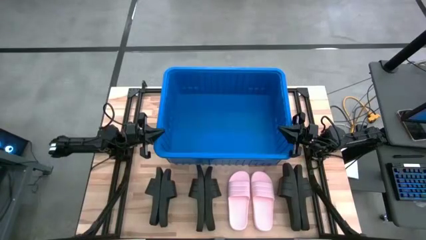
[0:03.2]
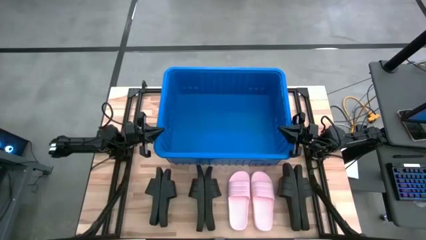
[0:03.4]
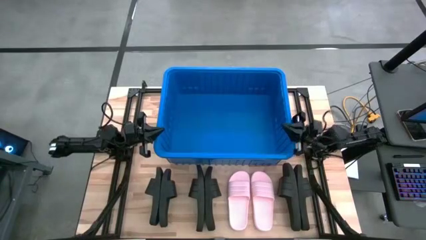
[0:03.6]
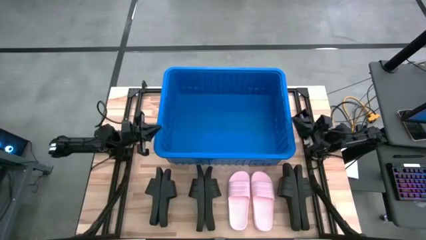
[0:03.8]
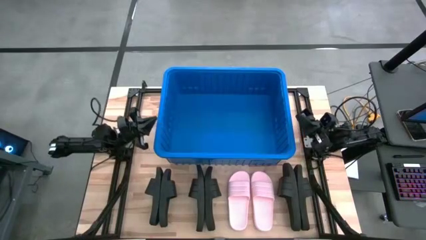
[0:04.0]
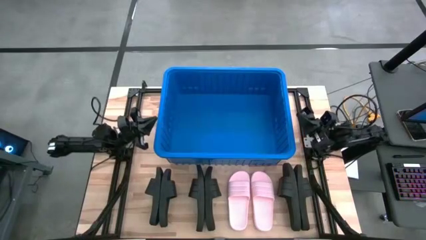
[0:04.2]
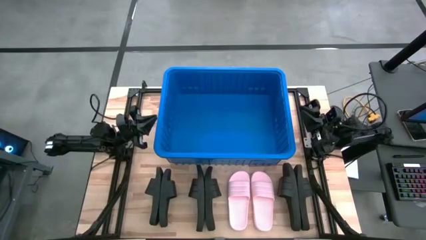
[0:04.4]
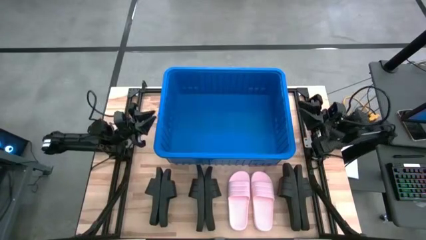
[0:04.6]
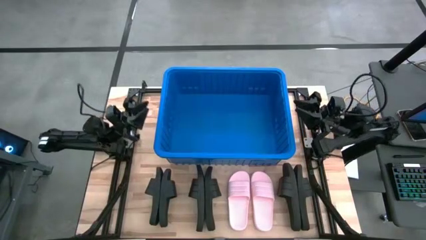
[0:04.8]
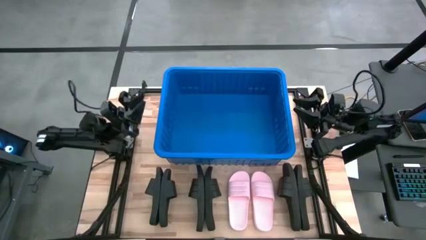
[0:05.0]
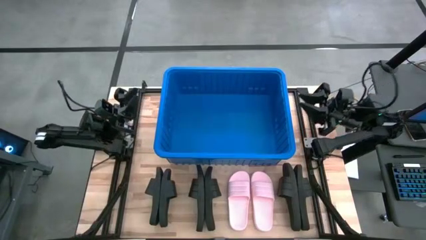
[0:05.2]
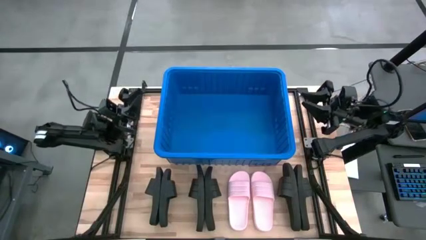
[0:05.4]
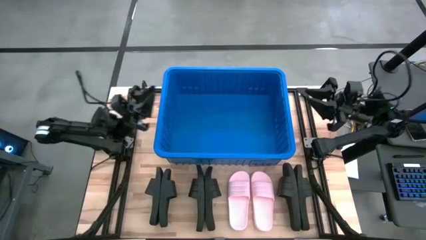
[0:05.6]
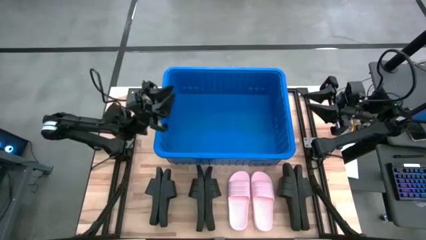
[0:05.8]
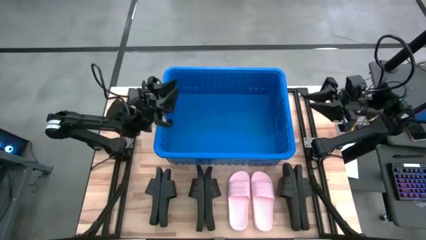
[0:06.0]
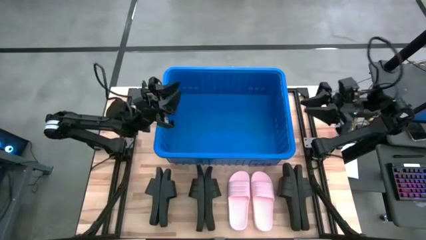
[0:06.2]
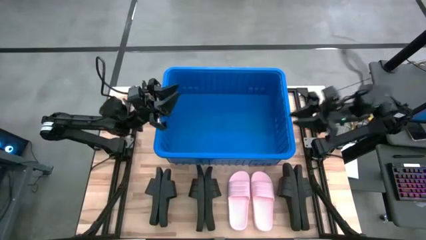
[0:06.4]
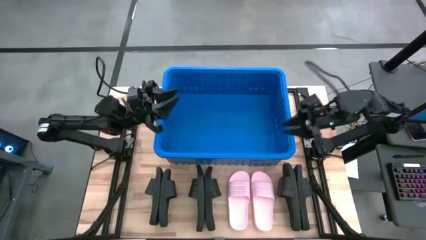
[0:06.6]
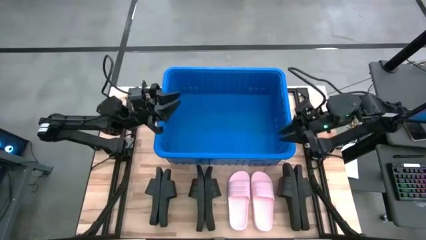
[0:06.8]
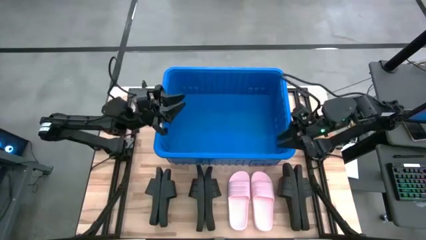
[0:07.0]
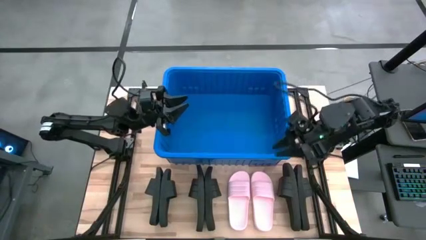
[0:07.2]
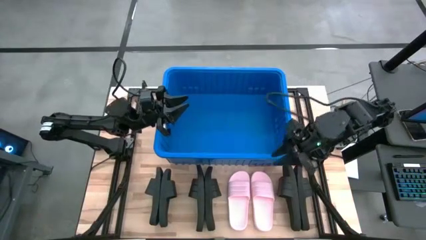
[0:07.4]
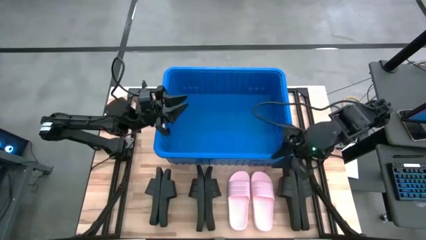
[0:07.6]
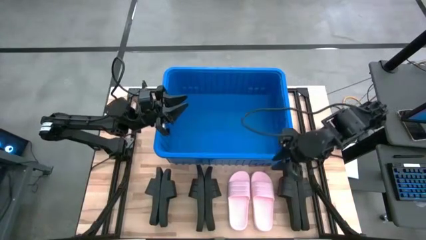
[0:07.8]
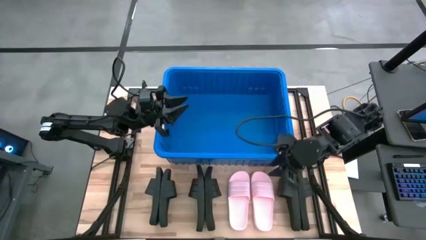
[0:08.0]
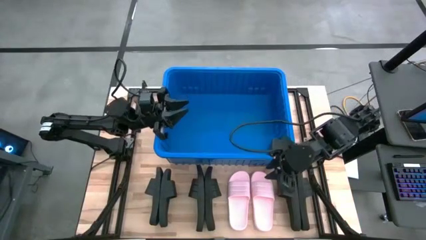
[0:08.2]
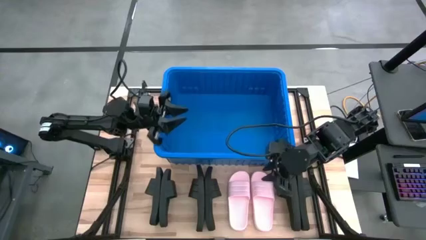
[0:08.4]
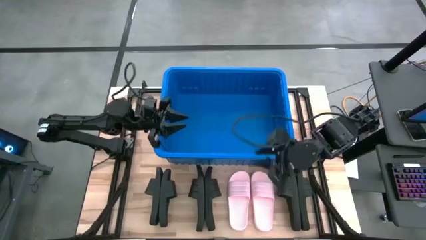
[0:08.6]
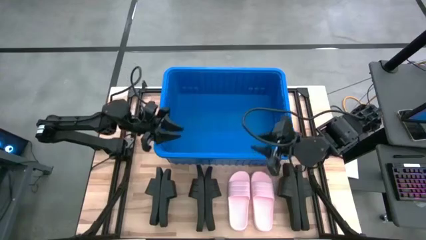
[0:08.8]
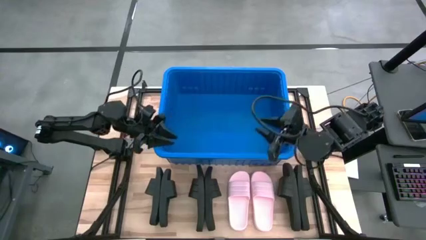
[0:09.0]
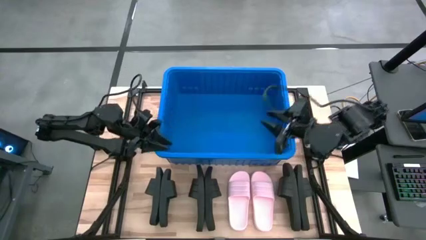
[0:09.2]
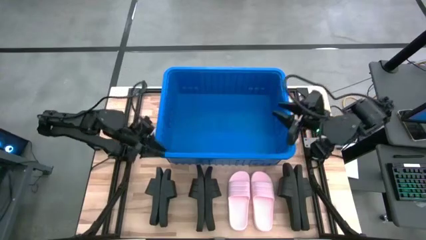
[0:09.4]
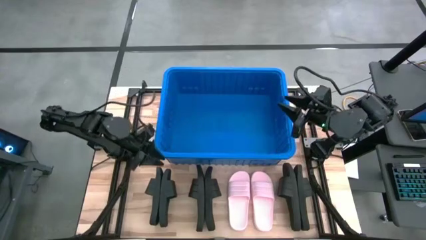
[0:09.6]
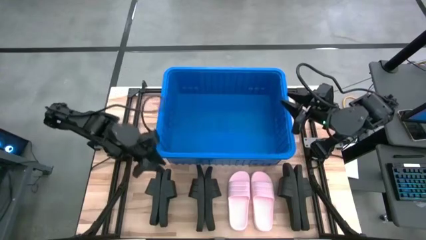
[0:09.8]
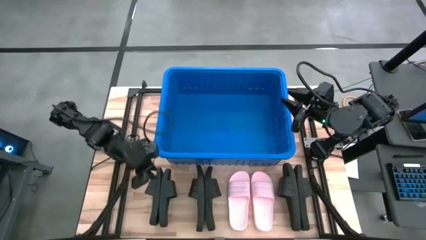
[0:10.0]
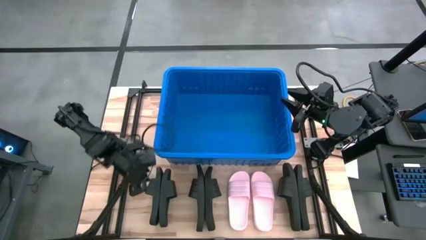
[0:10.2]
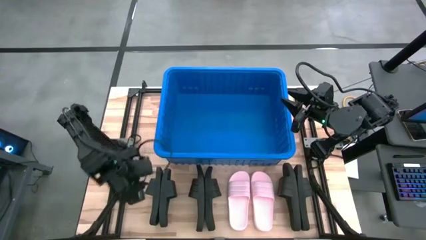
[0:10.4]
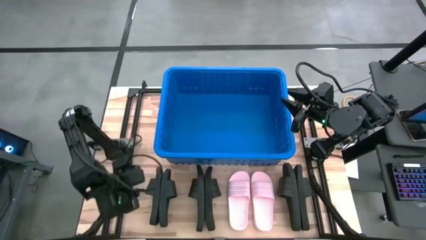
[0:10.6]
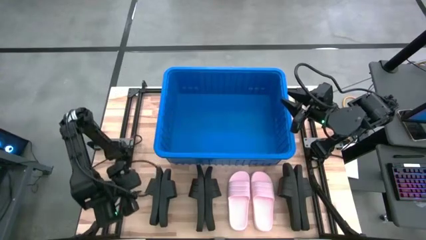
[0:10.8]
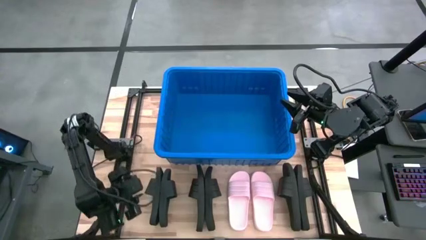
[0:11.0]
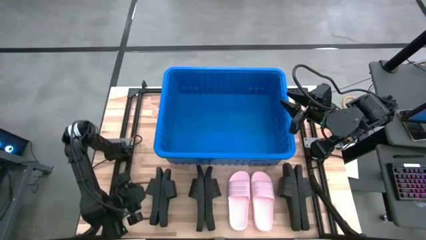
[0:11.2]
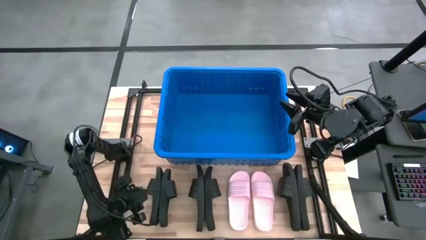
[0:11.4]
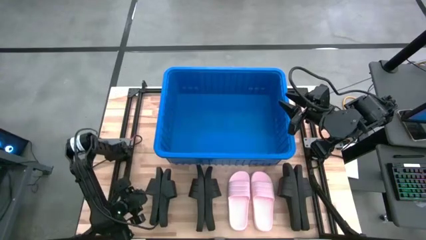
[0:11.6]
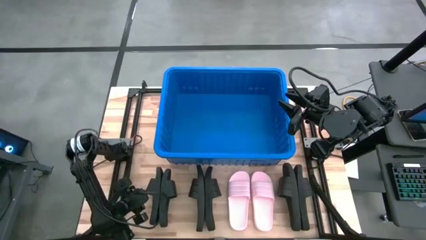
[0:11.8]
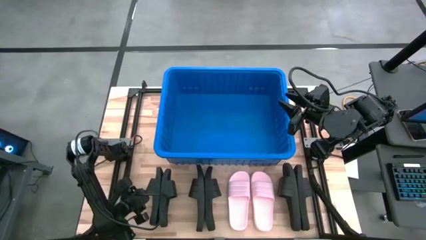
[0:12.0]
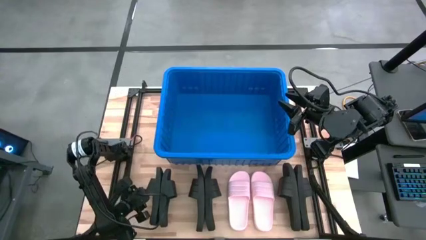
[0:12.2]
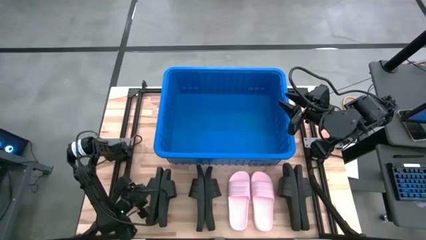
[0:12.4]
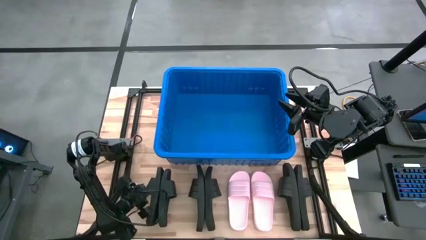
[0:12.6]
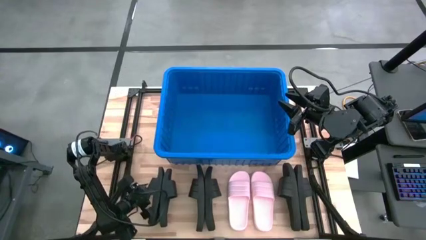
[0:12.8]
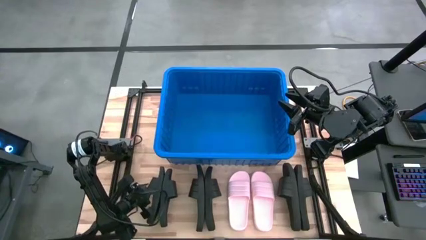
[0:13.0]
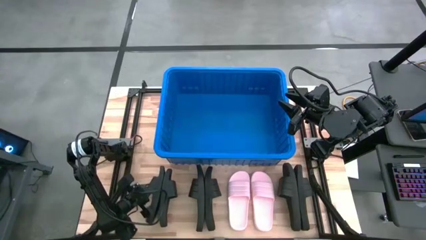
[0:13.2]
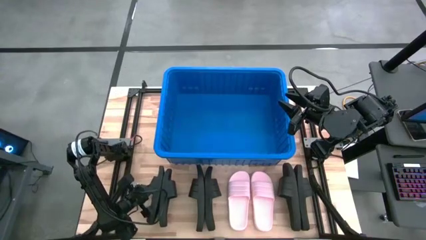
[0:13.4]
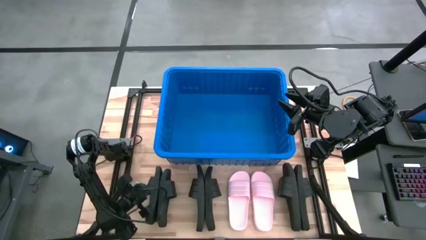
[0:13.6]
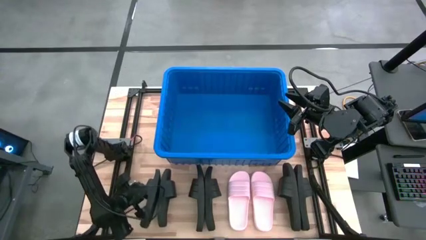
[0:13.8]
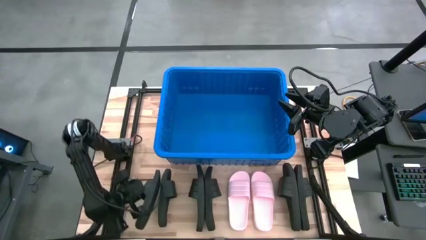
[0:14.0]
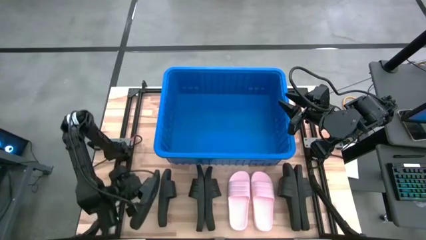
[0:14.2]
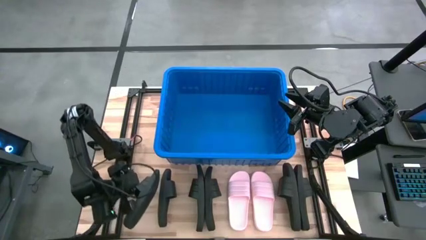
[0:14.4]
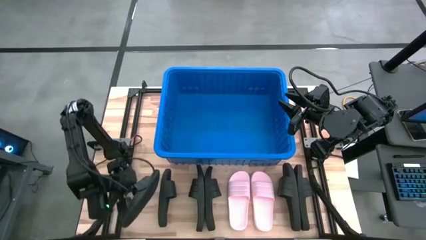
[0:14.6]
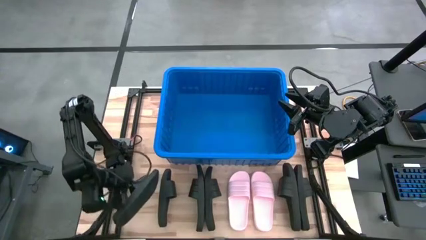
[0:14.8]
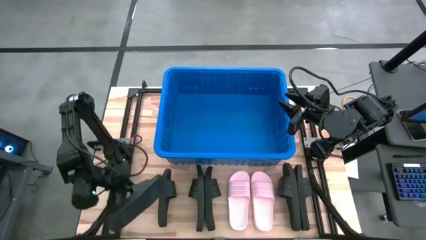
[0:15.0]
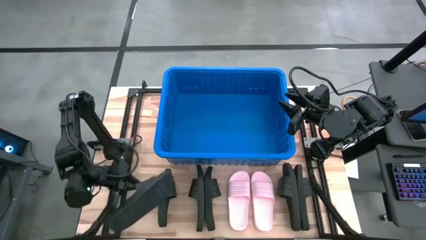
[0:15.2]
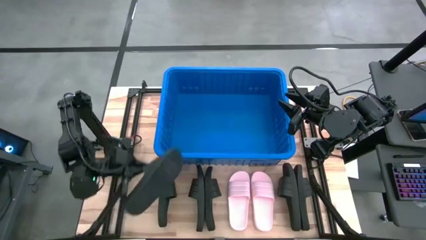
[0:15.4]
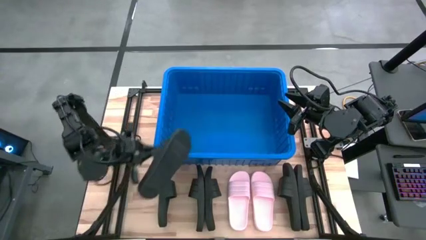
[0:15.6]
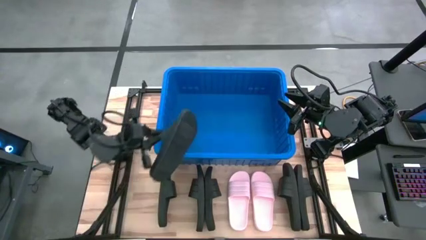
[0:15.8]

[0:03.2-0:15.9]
Task: Pick and place slides into bin
Put the black slide into the blue bin
